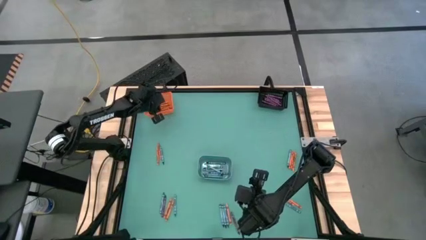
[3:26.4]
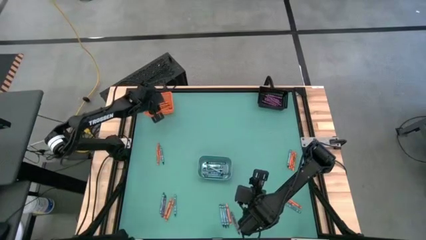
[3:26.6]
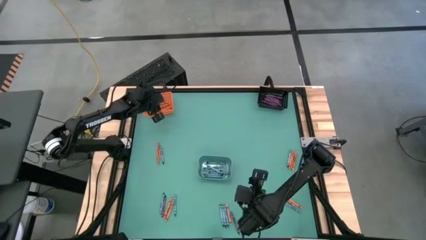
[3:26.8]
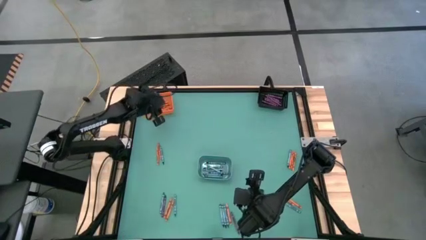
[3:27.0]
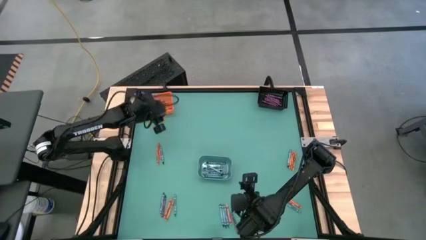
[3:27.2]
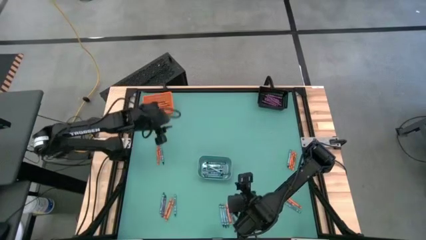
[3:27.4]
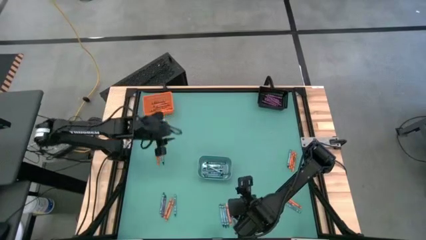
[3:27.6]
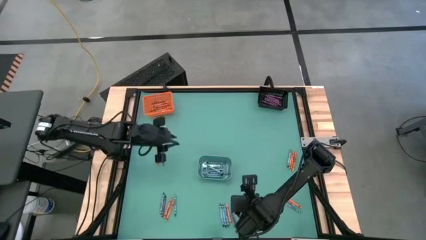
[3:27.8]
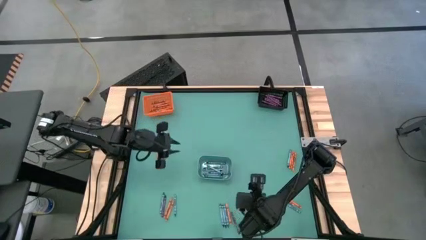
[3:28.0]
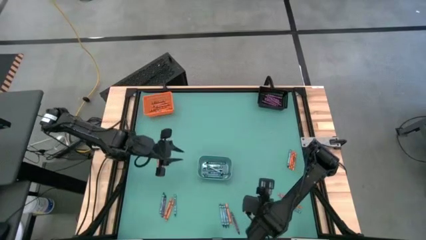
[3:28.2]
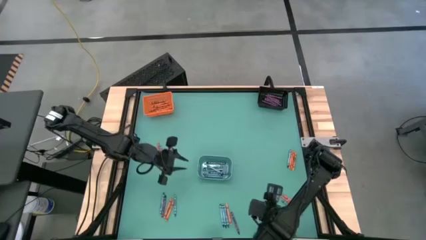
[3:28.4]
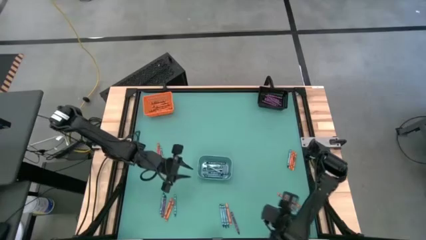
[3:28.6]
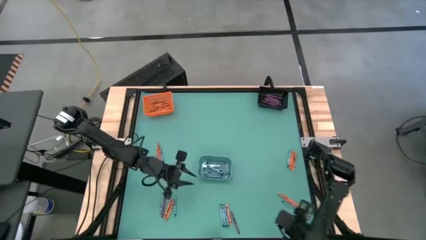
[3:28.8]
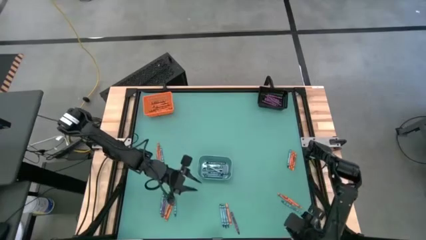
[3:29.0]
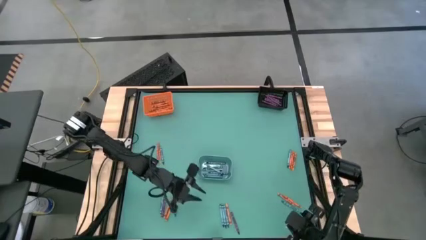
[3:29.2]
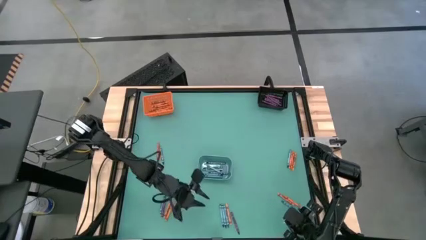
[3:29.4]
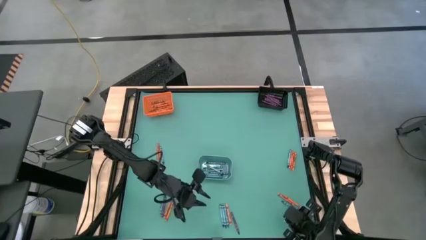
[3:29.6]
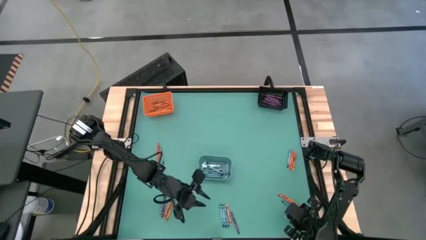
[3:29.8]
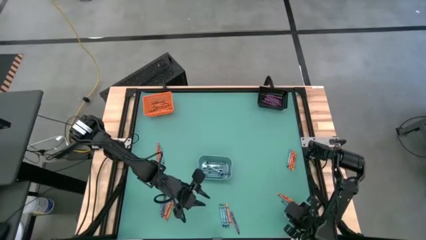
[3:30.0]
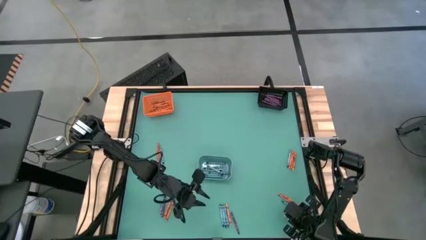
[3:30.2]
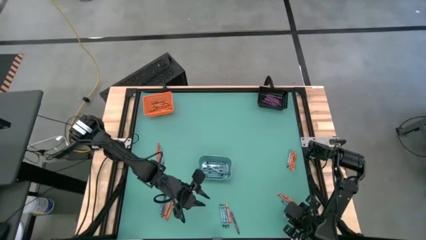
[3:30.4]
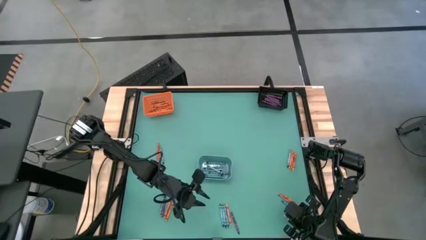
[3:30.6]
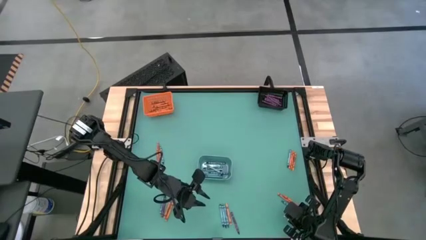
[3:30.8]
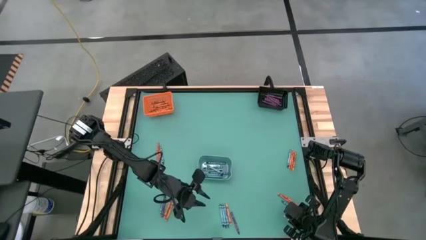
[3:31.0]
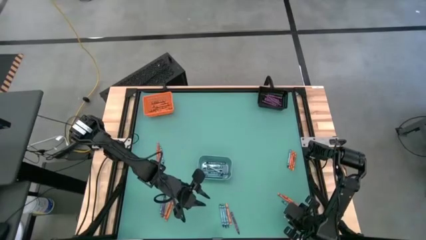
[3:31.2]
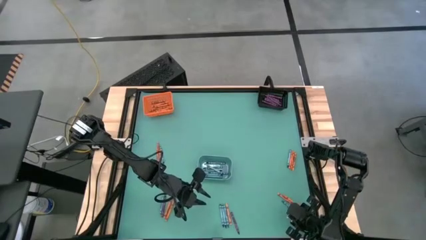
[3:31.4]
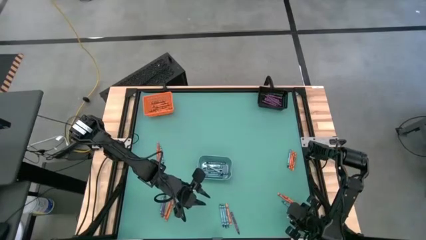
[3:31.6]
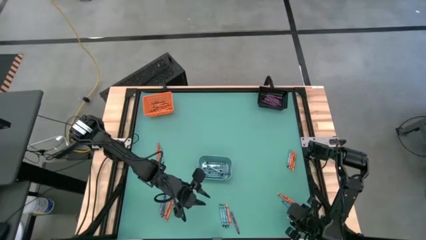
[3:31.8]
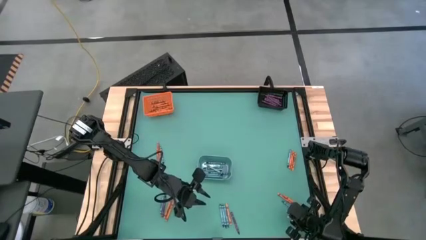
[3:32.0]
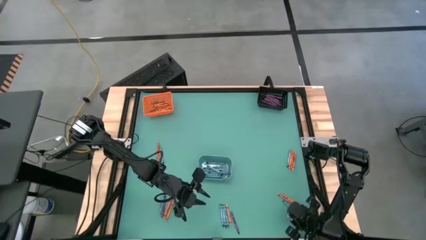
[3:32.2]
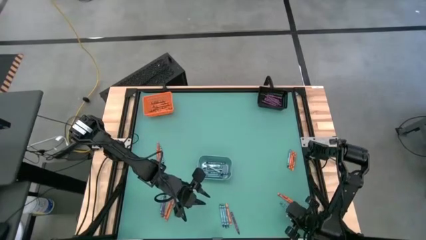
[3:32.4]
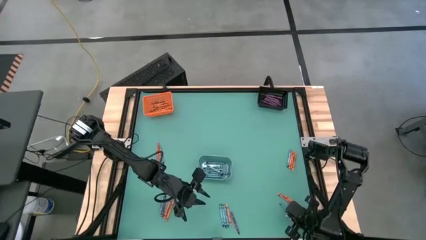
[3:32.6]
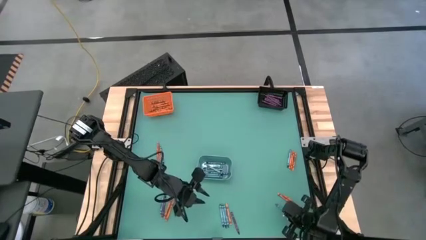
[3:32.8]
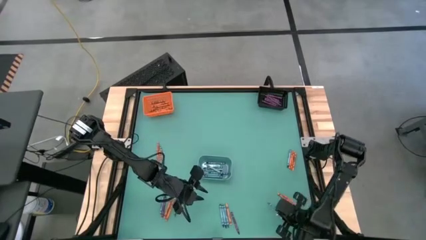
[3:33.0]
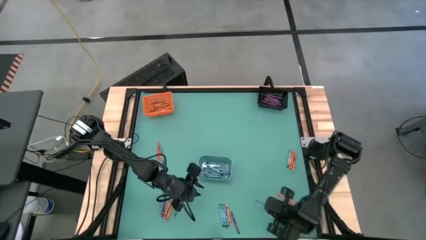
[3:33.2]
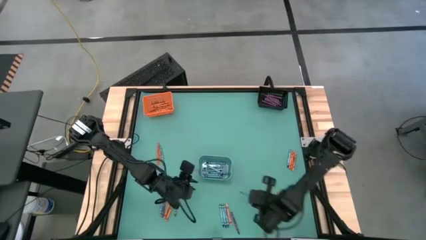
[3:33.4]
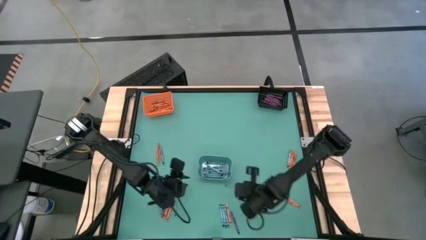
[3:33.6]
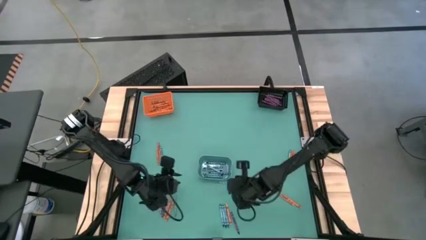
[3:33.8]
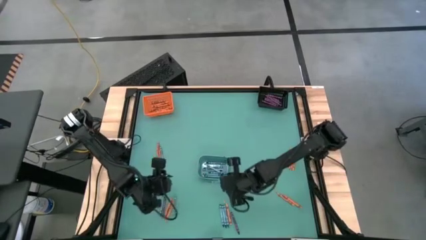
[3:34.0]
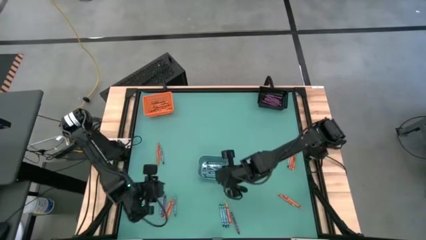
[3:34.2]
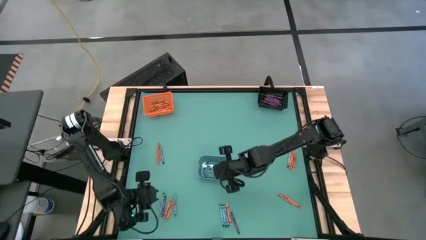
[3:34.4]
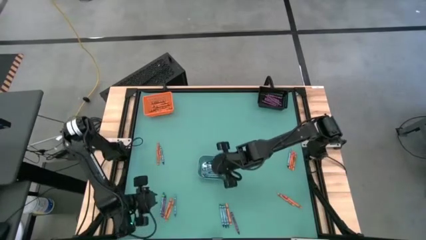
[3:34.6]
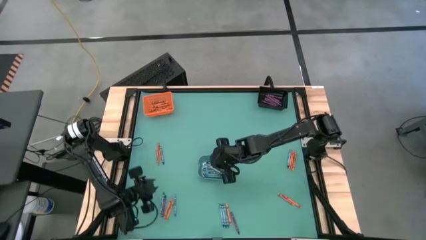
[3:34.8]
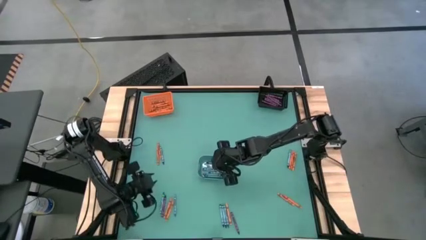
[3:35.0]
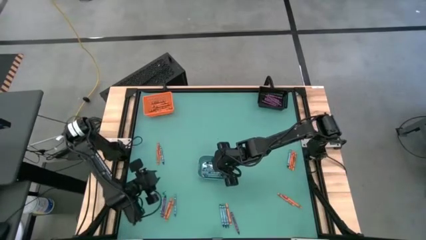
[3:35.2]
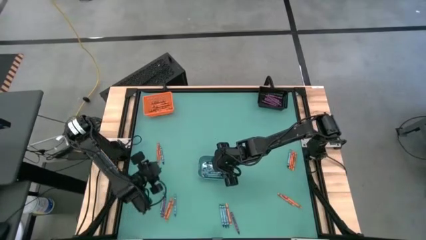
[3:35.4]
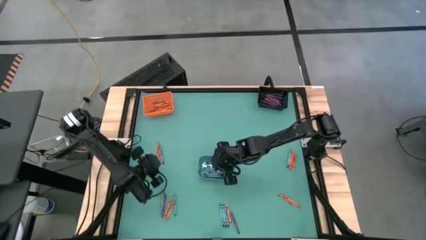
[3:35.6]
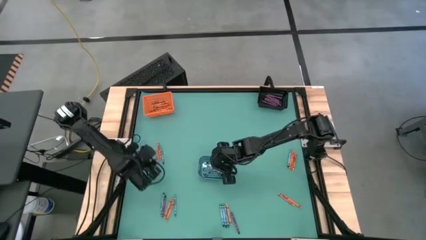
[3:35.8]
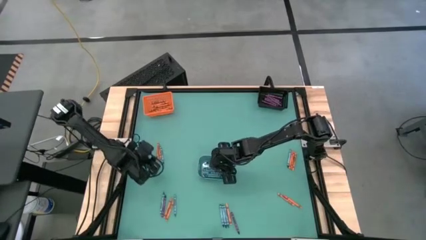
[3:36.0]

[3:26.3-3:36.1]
Task: Sort crayons
Put the light blue crayon into the blue bin

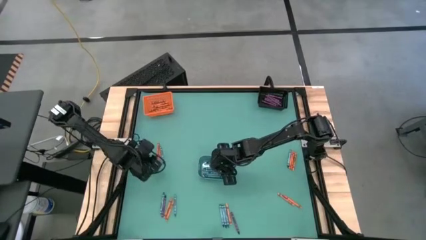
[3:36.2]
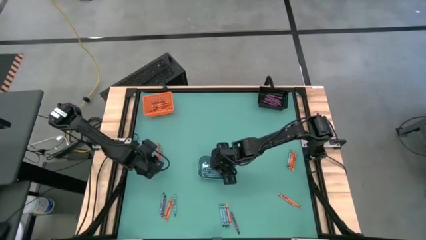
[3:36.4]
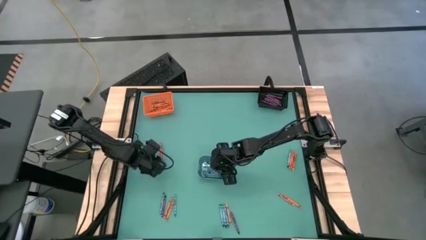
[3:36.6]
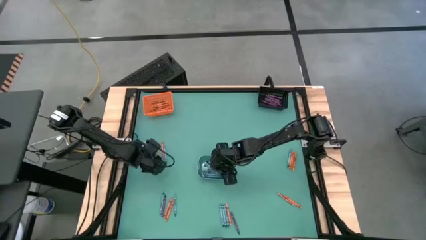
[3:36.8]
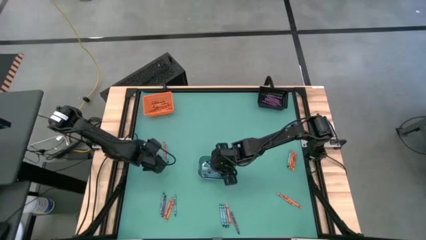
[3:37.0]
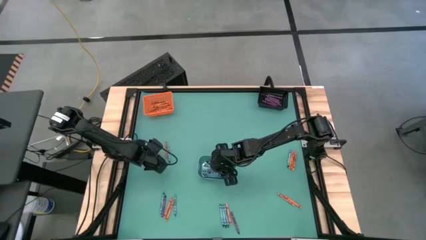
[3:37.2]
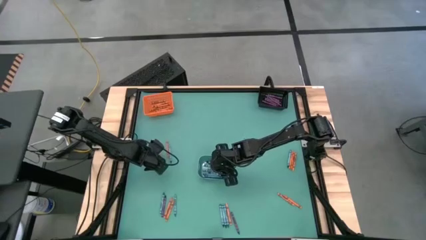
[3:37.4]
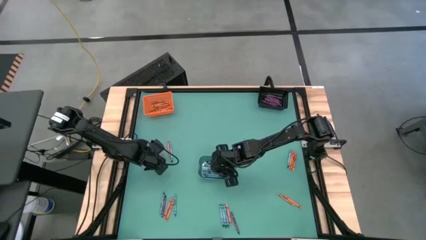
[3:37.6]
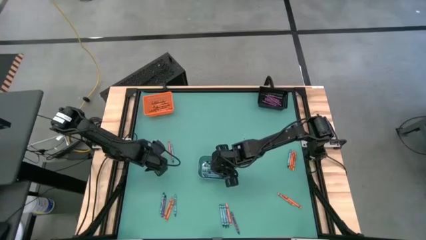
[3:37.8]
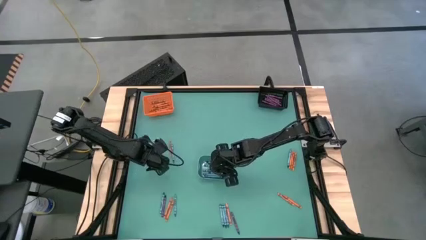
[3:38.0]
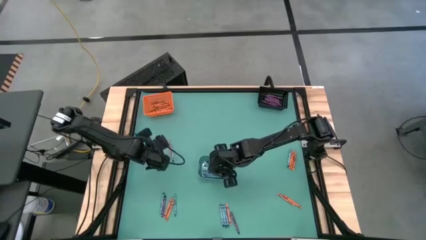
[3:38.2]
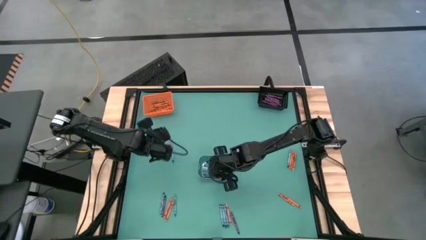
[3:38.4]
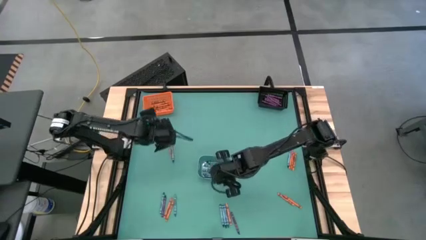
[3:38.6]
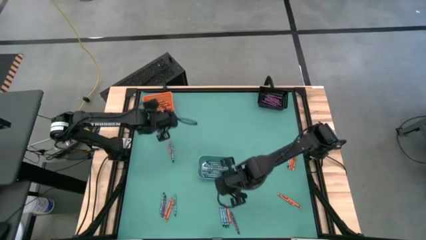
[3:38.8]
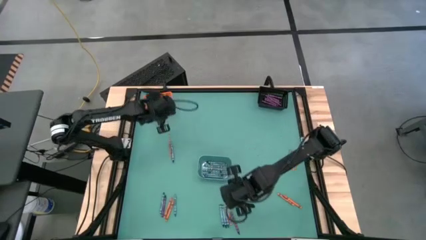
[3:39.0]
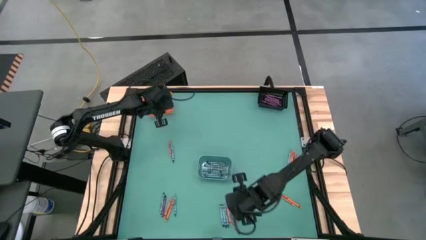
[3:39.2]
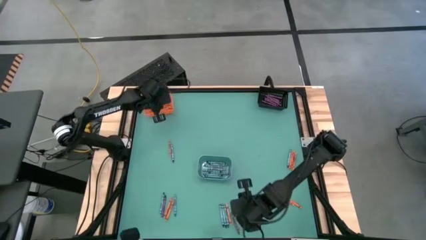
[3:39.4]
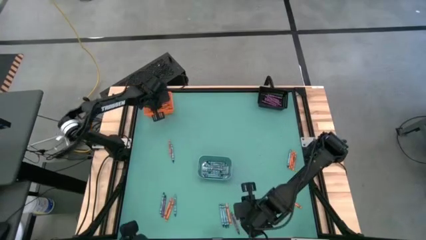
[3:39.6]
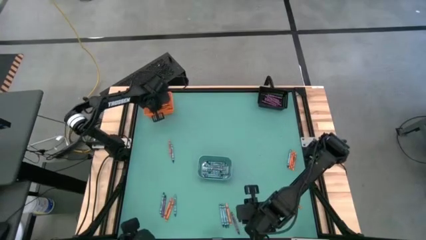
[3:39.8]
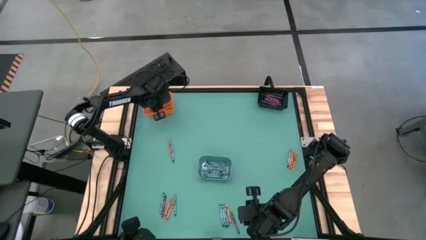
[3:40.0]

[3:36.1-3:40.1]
Put the orange crayon into the orange bin

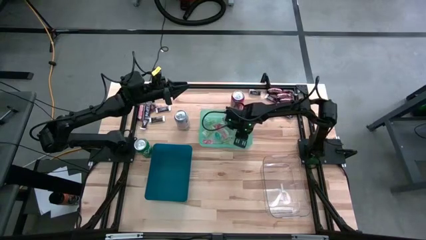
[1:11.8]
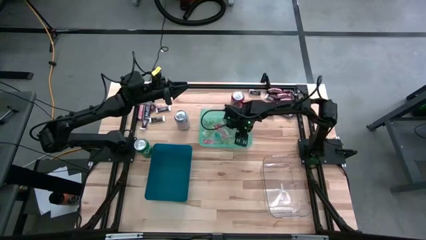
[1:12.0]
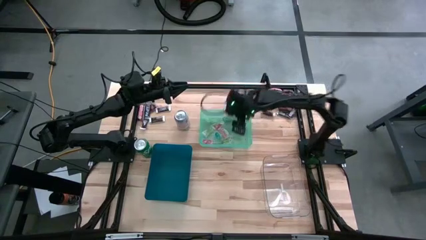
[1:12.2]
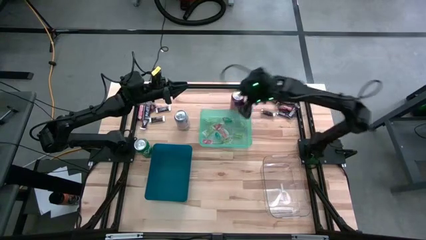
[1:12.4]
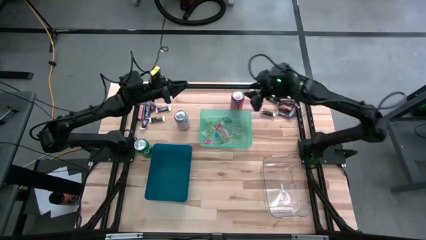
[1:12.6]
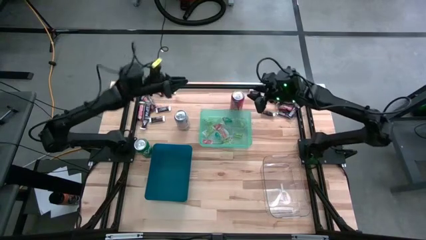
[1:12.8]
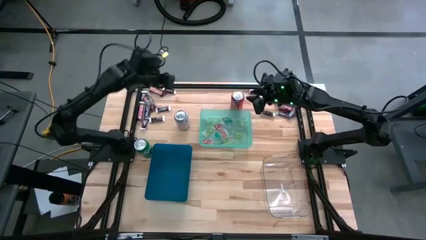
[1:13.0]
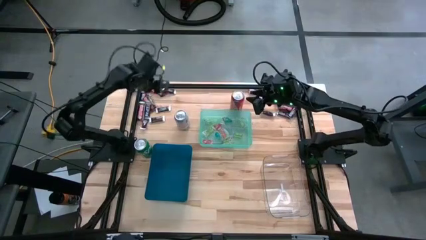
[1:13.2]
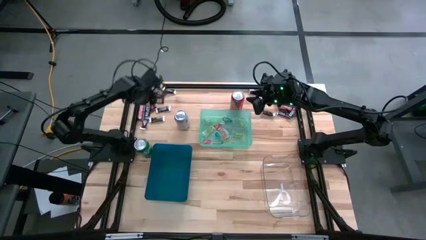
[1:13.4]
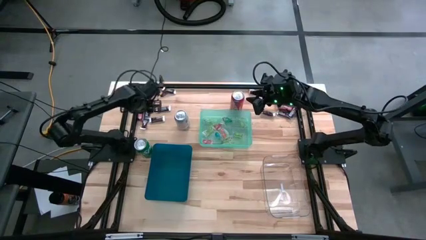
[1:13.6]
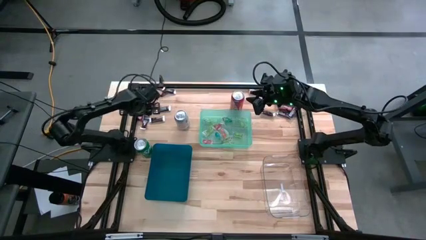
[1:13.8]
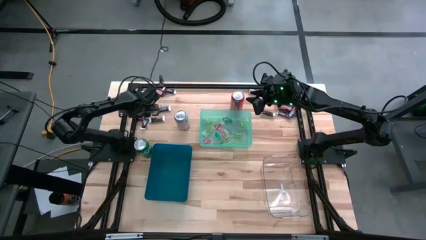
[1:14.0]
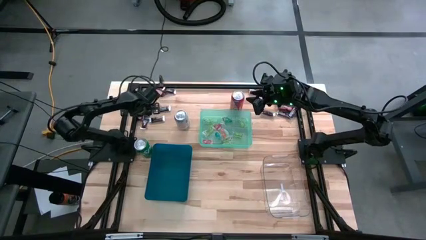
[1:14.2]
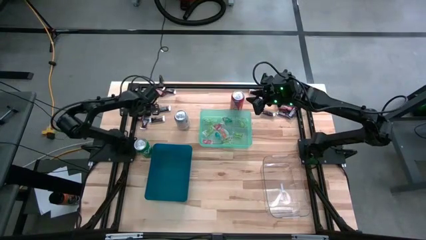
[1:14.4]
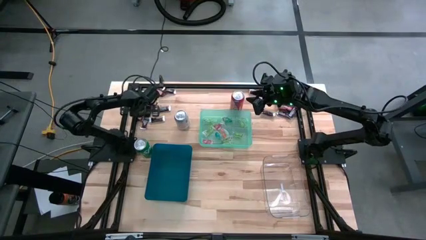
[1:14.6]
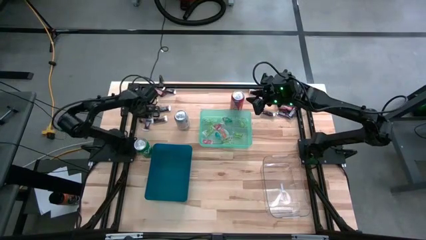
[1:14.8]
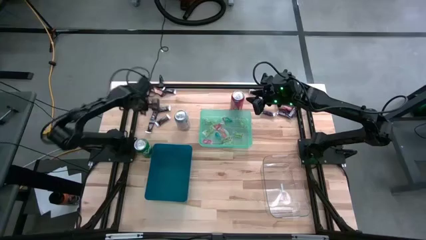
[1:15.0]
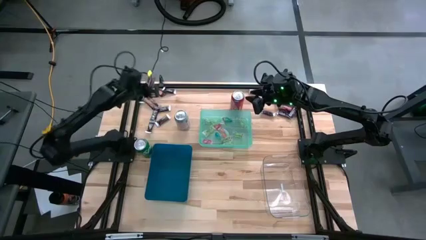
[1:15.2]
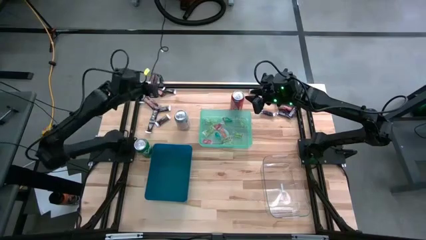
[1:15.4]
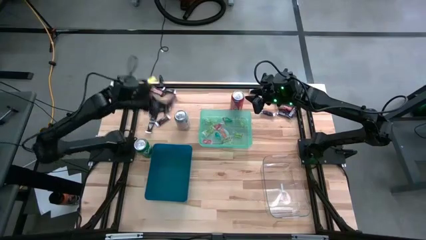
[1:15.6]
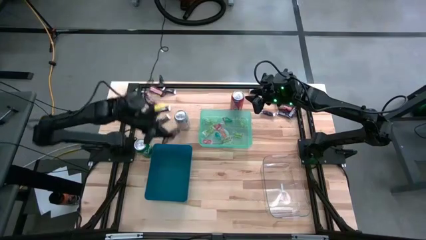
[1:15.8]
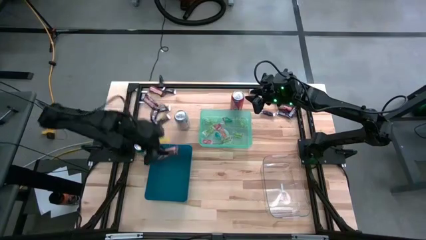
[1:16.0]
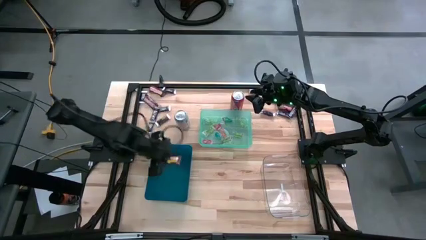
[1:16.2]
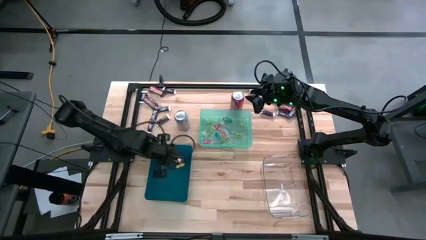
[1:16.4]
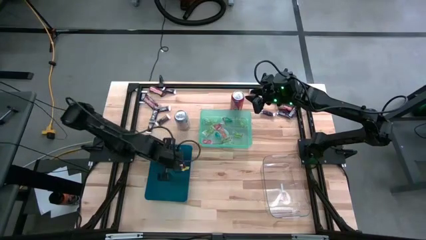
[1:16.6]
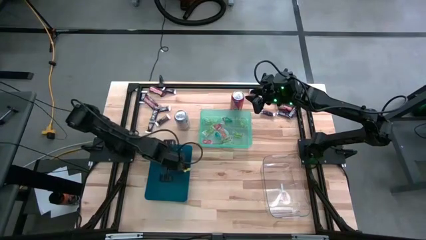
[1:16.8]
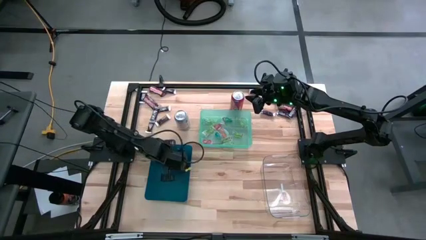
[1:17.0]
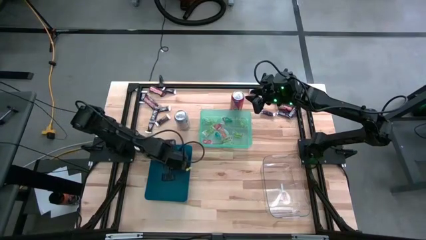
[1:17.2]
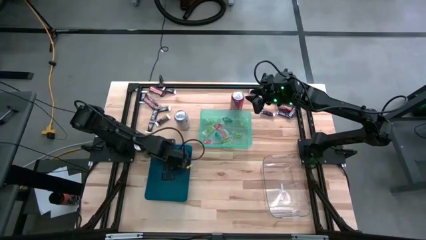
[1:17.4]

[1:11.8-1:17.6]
Task: Organize candy in baskets
Put the brown red chocolate into the blue bin
